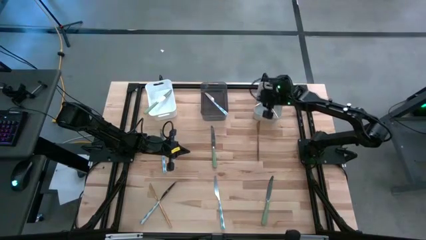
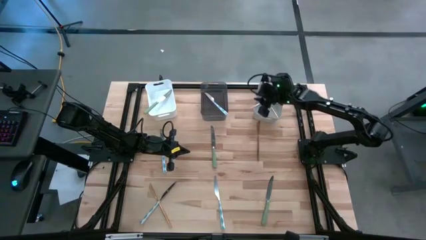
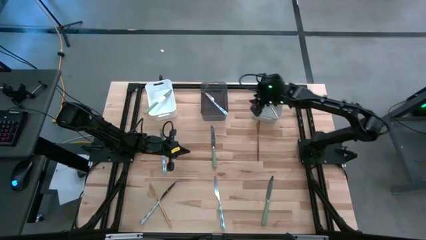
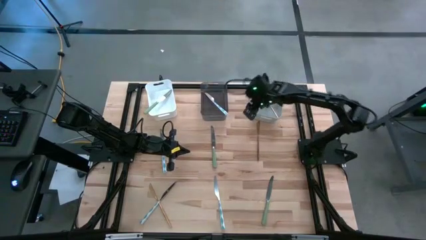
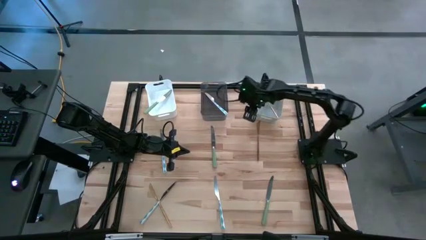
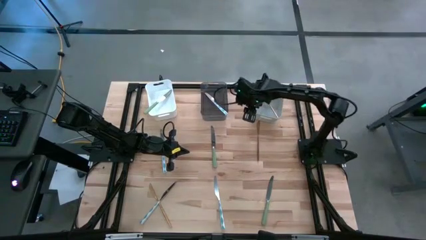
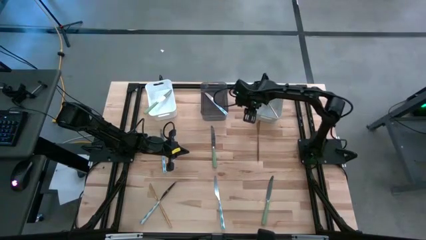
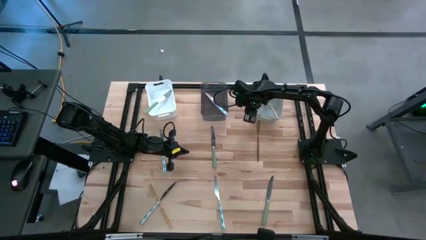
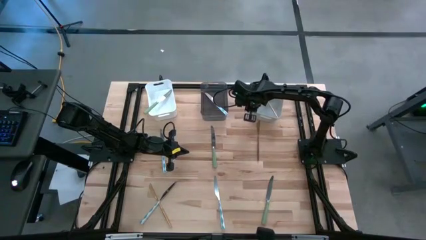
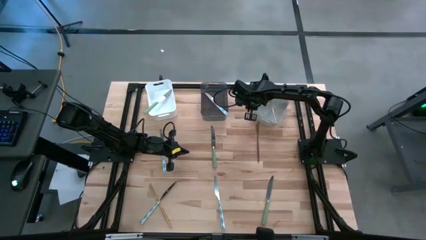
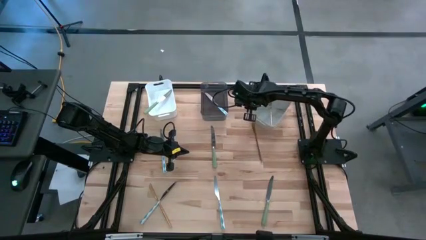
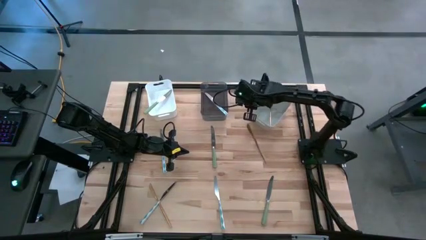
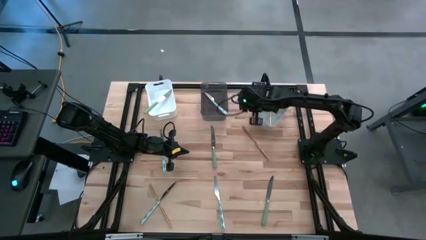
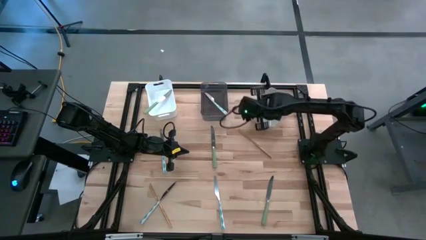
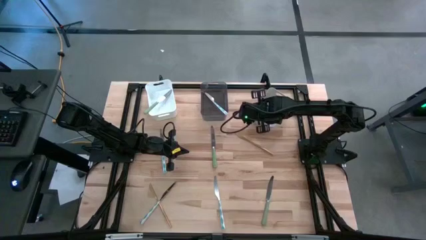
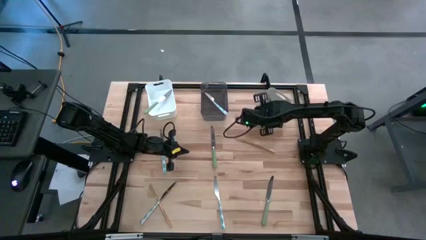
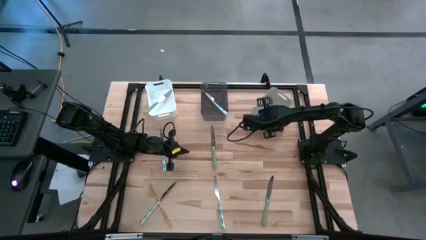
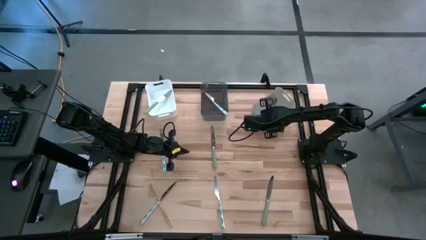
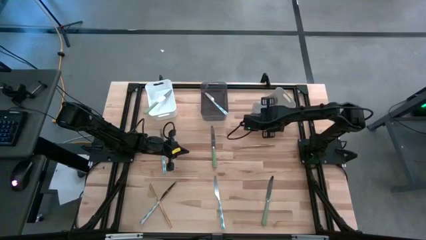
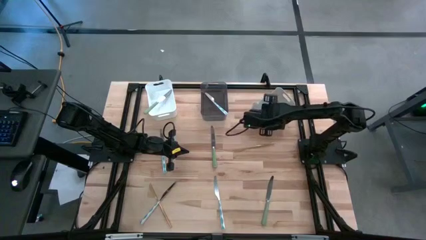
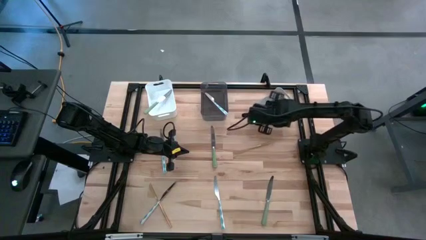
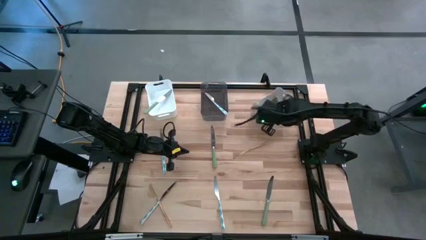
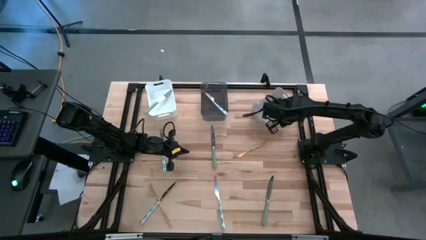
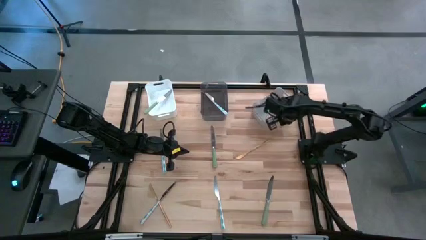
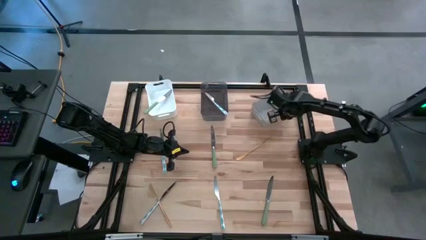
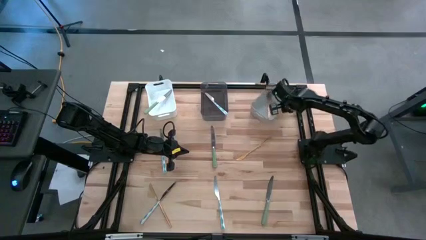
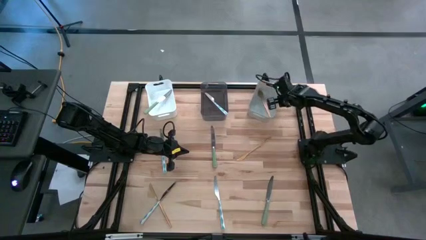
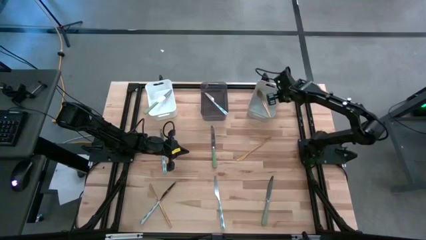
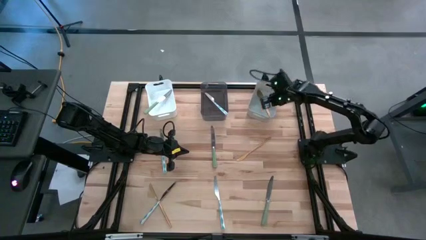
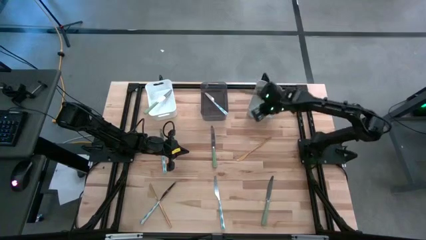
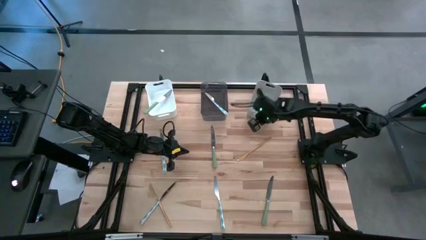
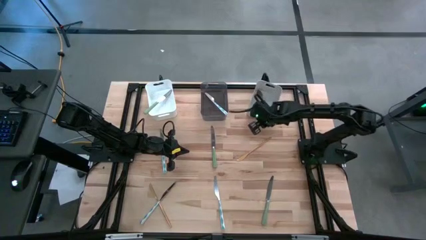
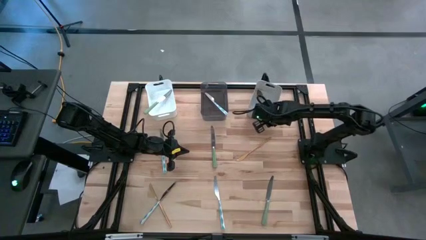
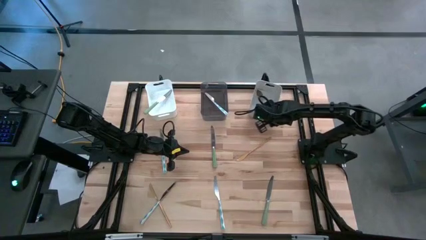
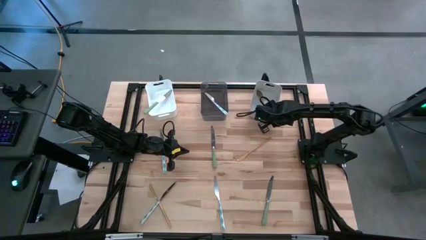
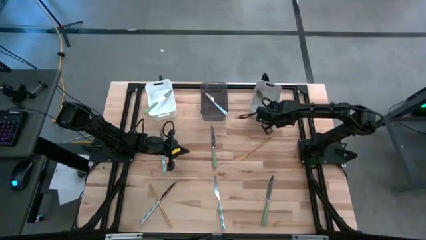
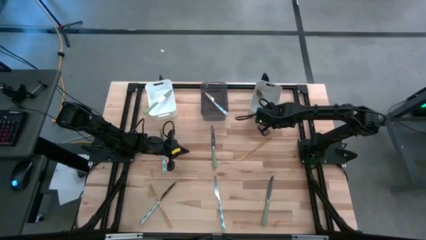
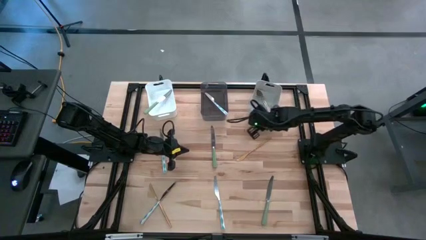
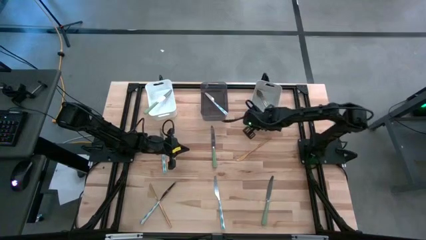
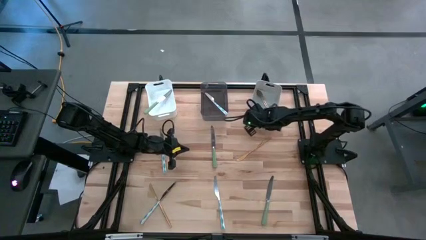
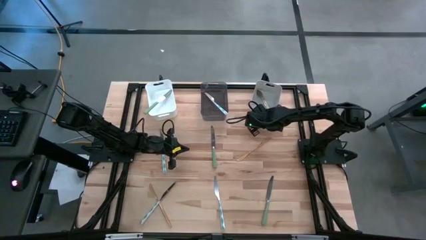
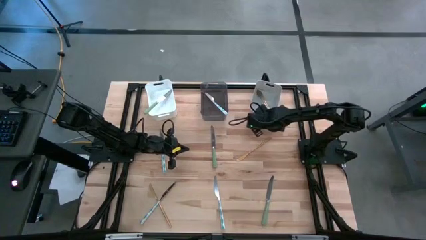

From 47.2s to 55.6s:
Task: Sort silverware by color (type)
Adjust the bottom right yellow knife into the gray bin

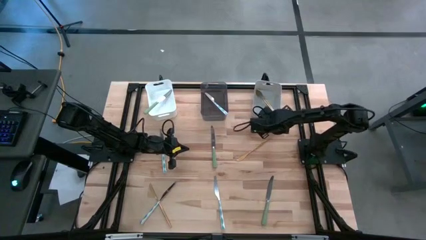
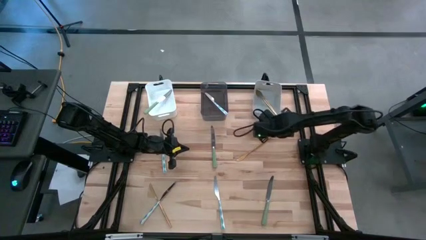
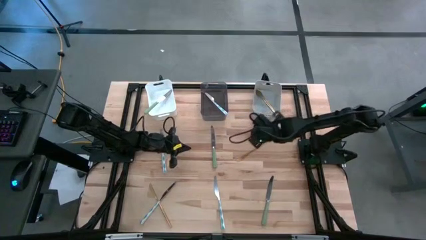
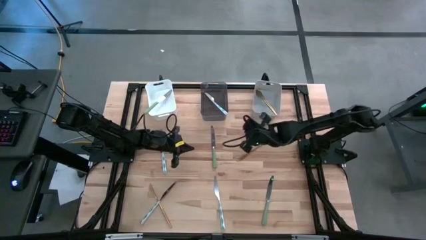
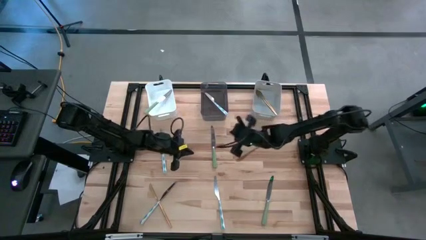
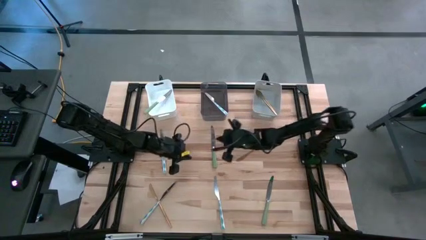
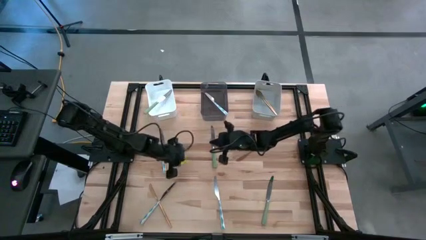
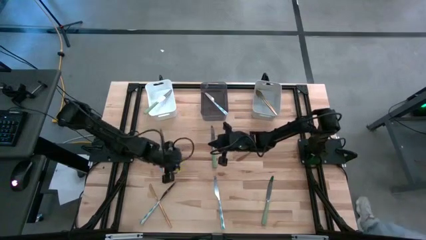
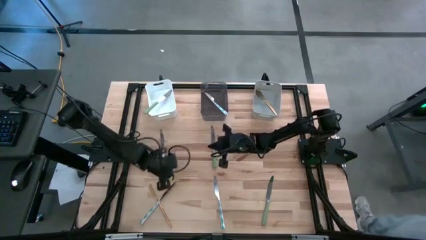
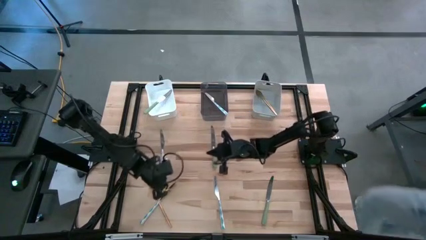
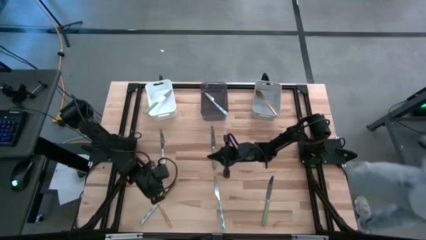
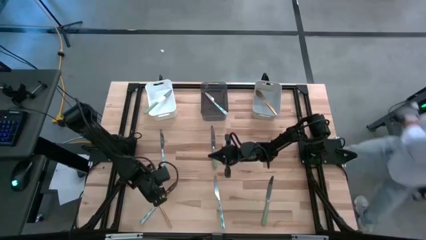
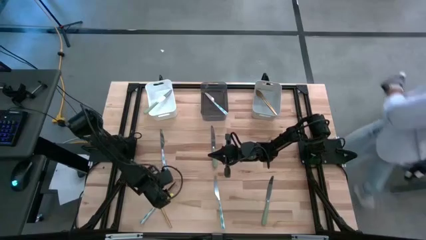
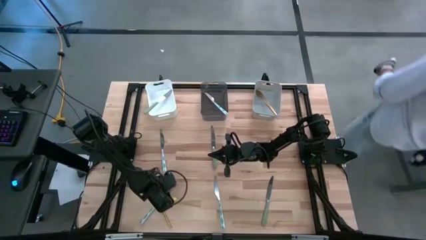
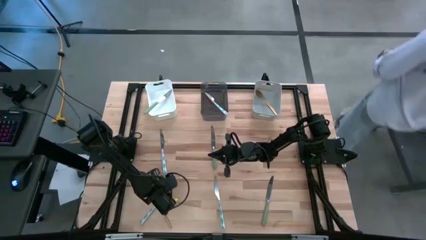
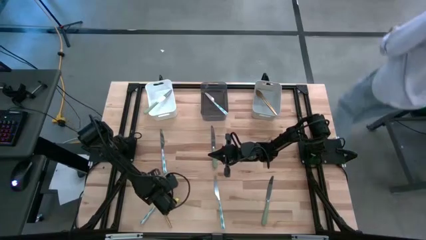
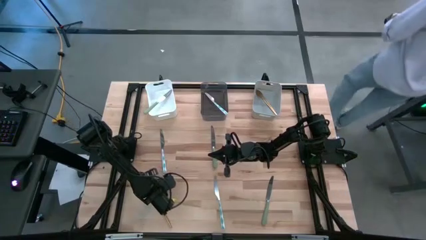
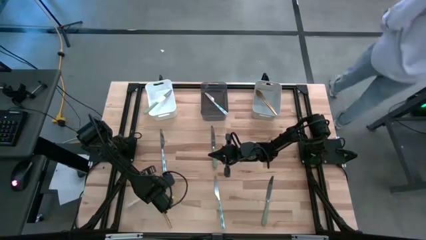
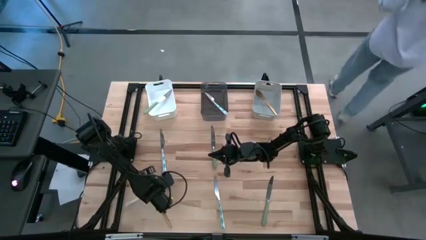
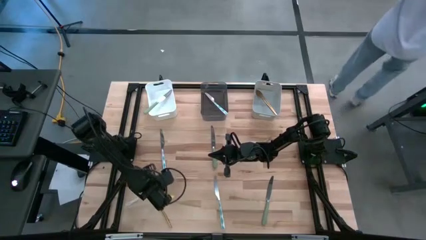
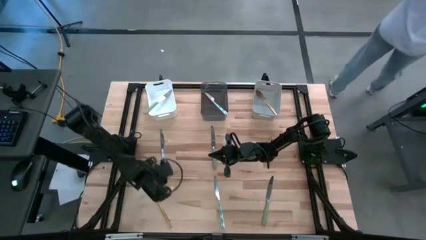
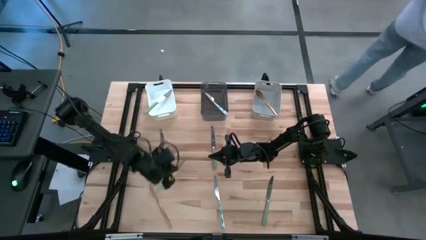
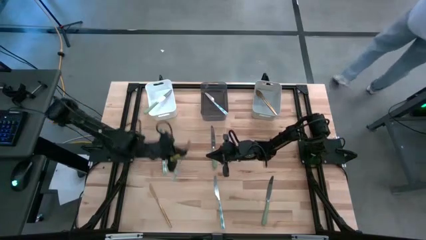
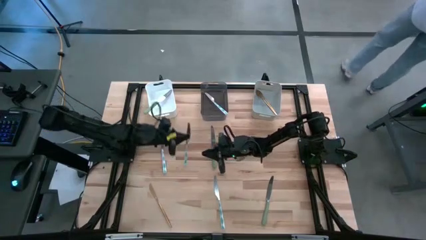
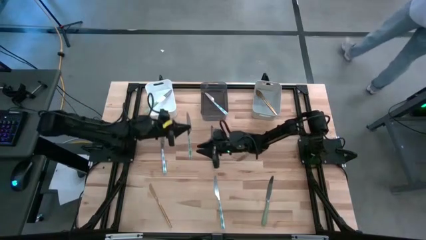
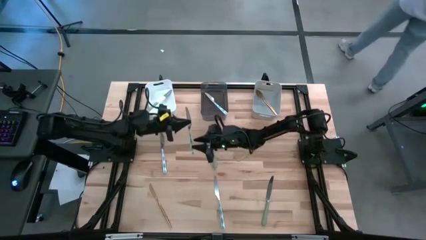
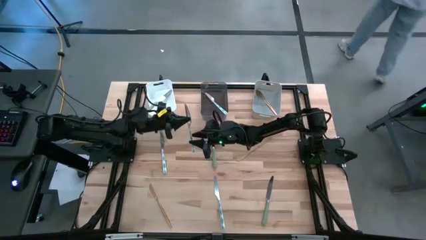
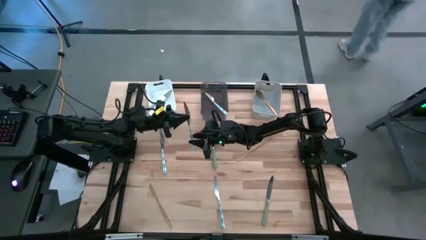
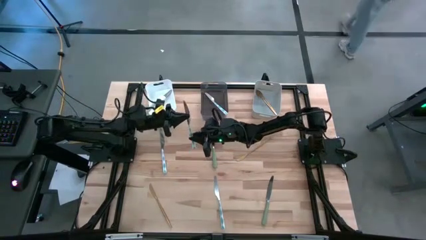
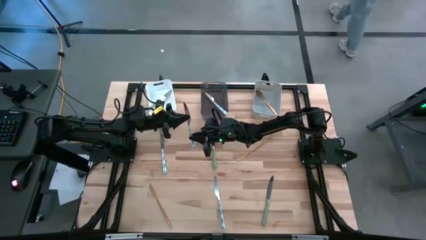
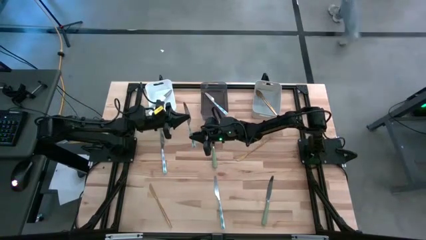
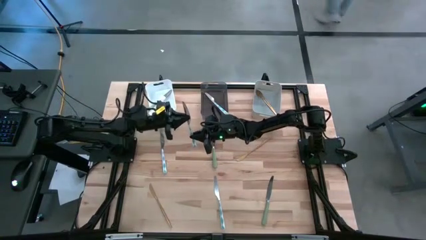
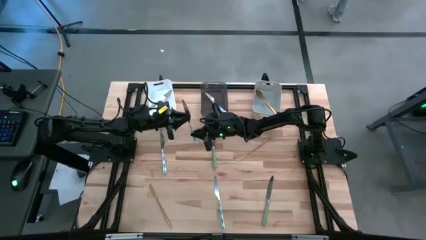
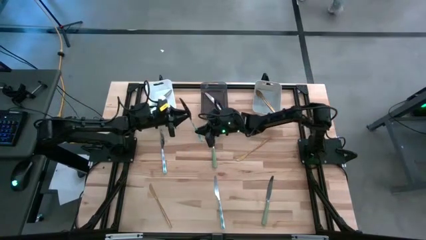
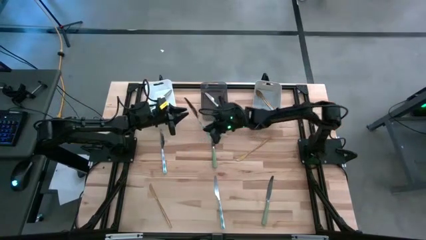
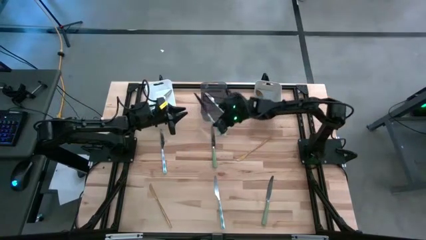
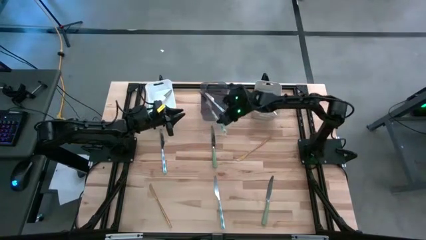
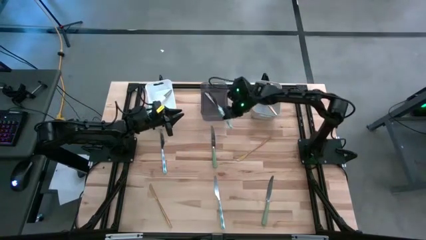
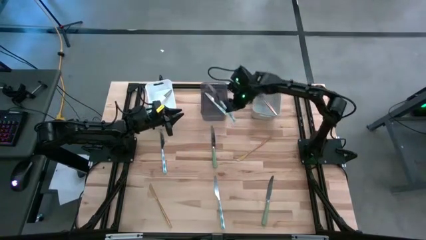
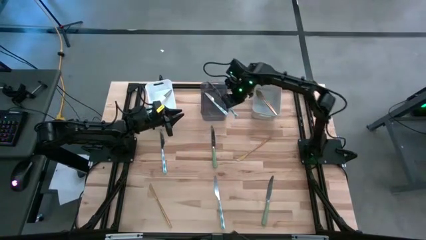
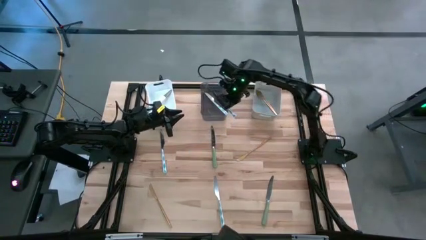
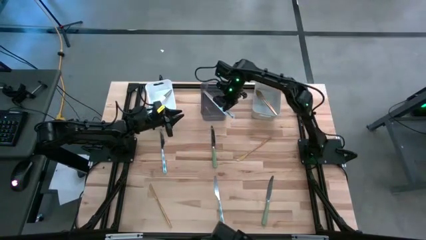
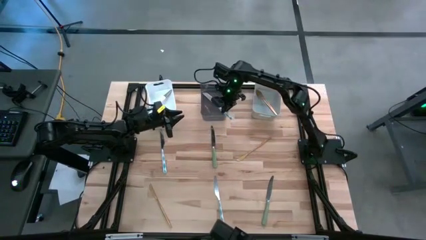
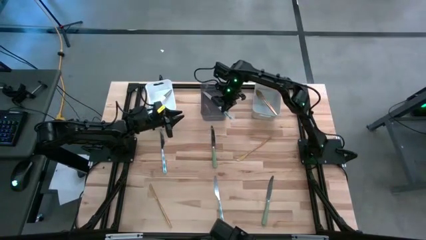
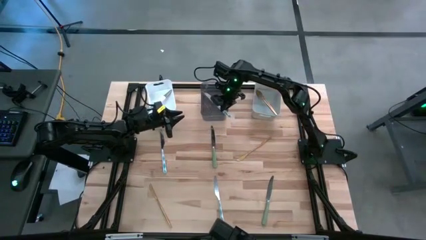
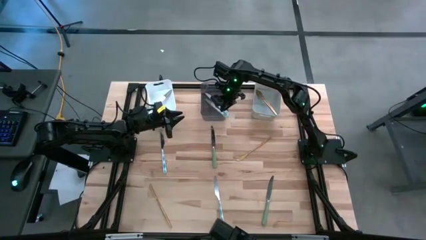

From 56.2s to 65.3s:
Put the bottom left blue table knife into the black bin
